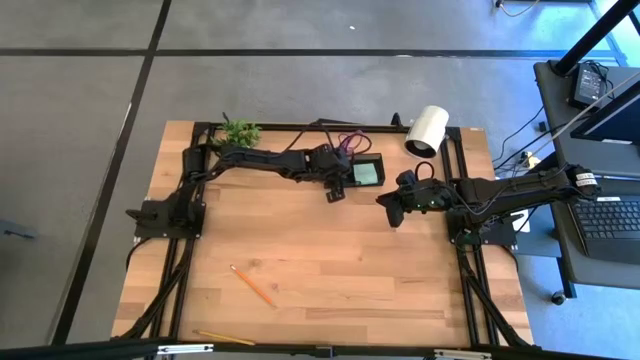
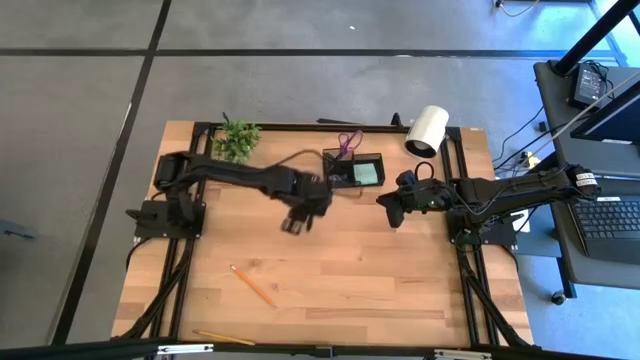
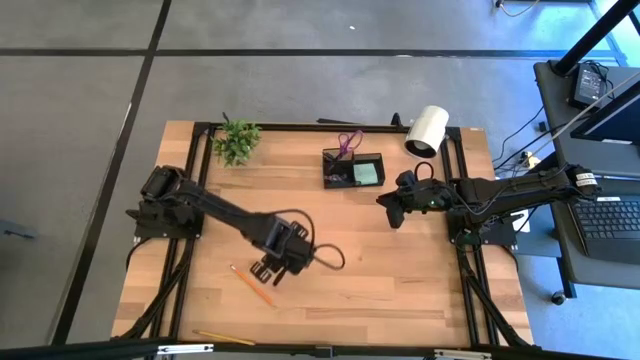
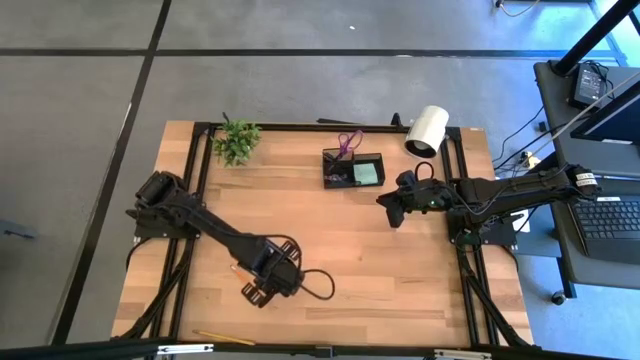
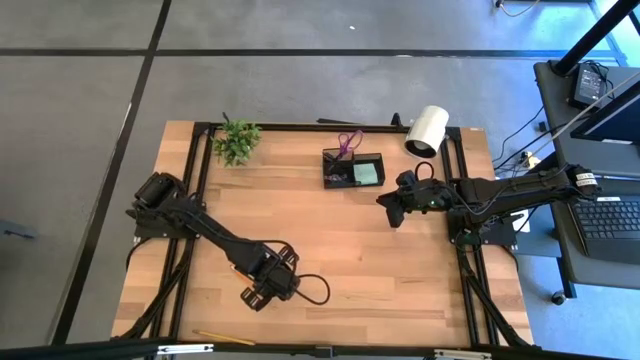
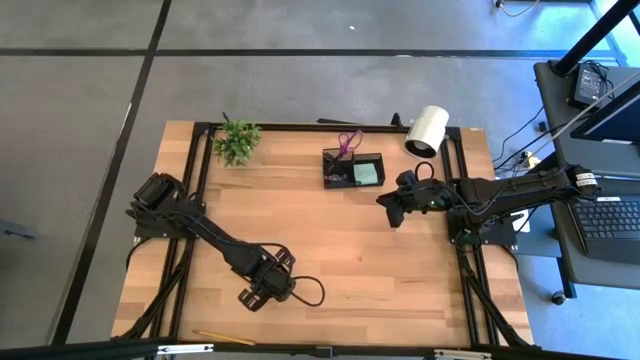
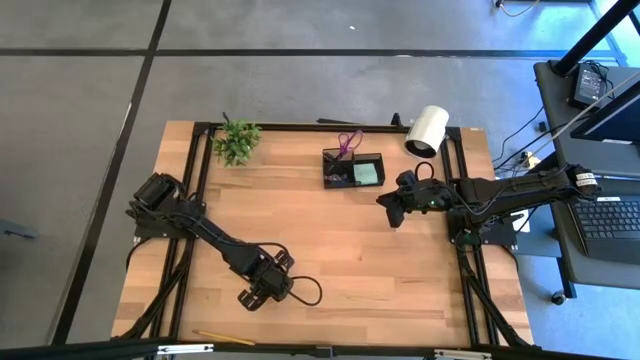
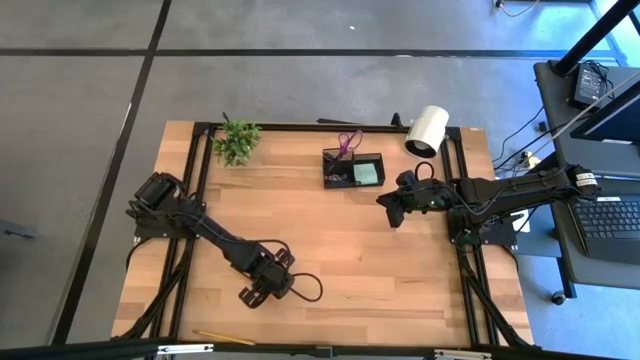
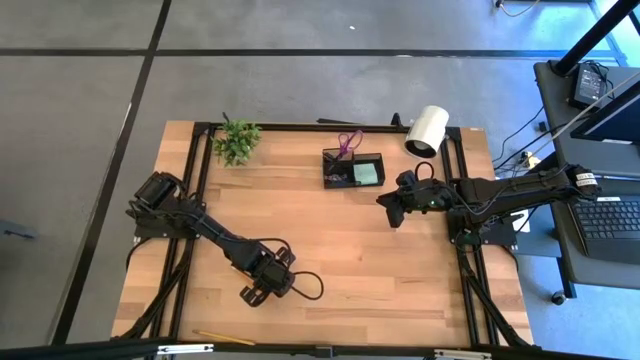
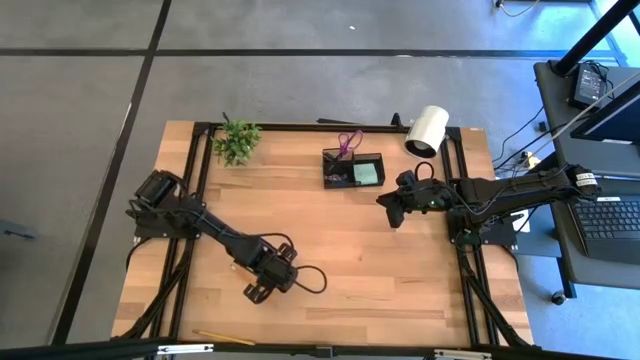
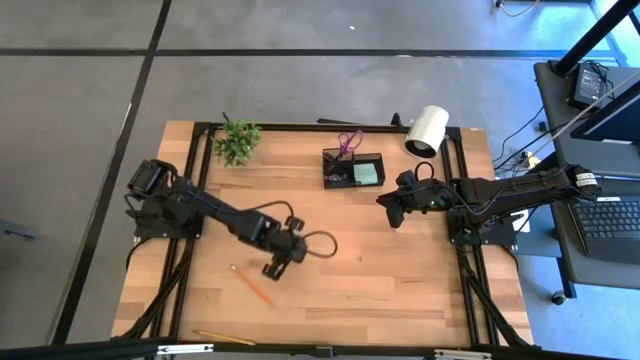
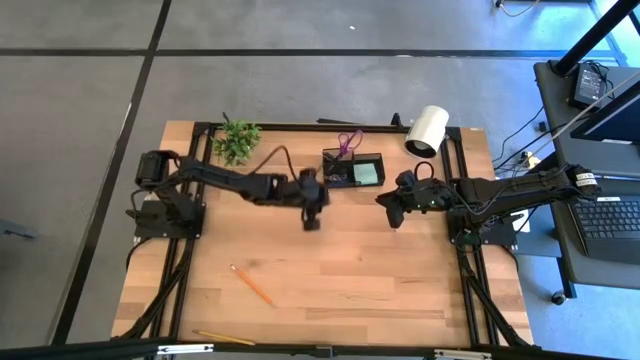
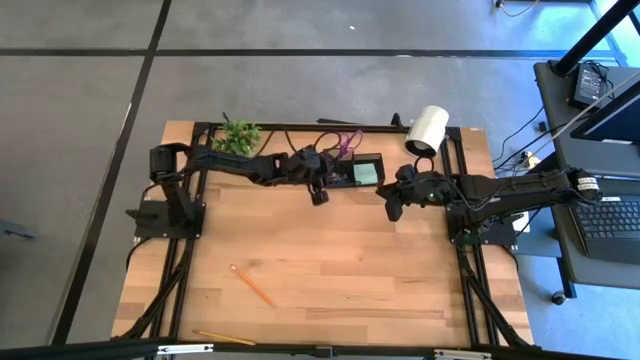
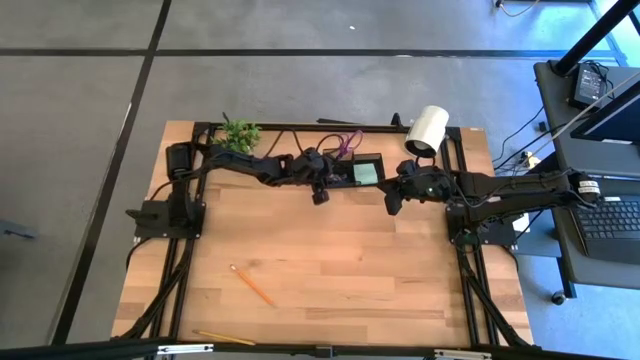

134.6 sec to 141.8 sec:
Task: Pick and place office supplies into organizer
Put the pink binder clip into the black desk organizer

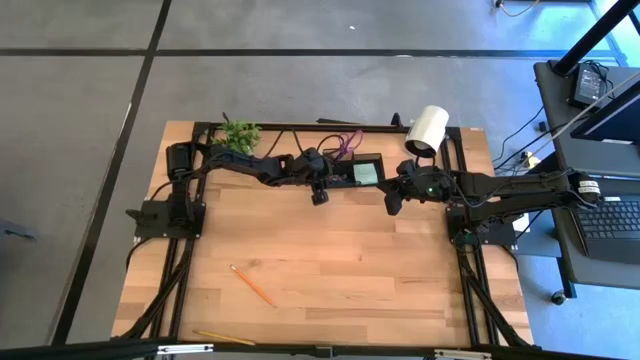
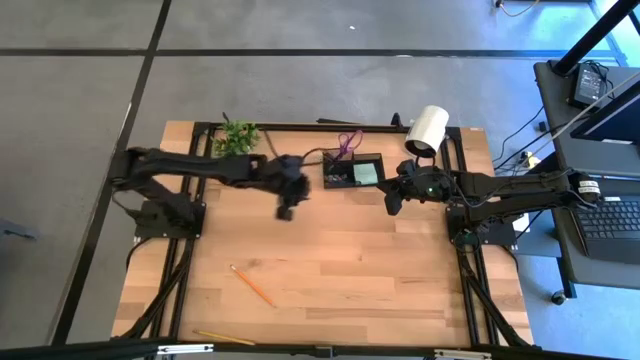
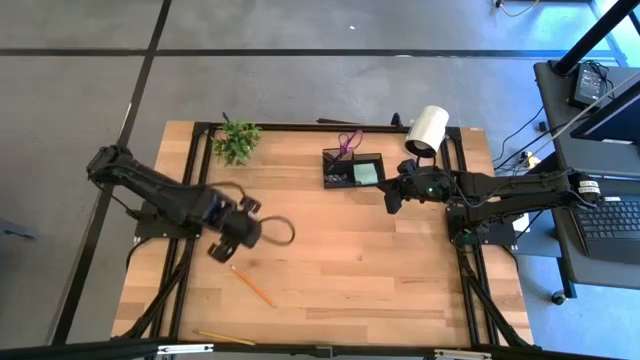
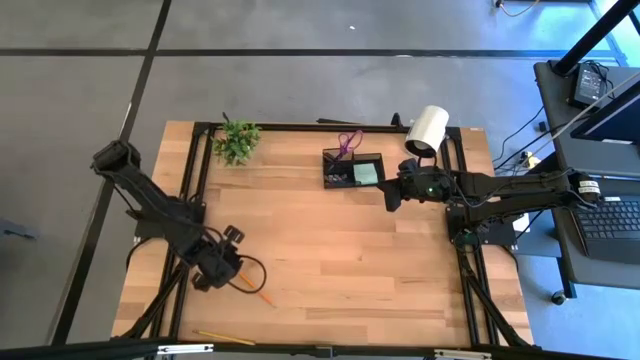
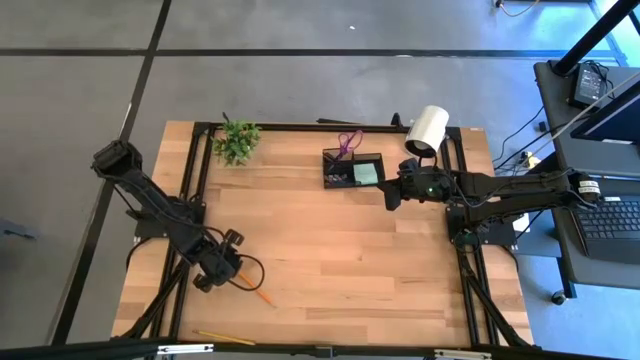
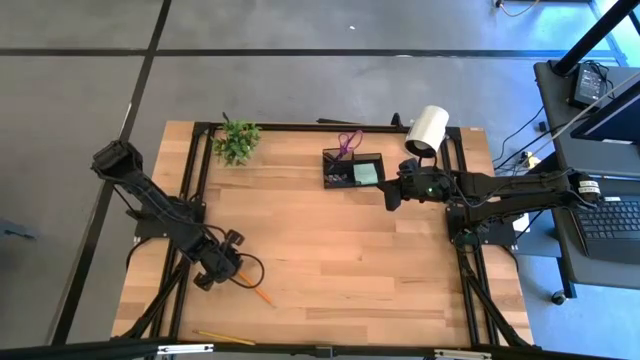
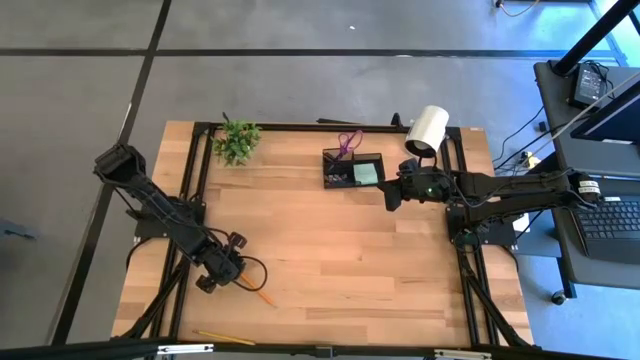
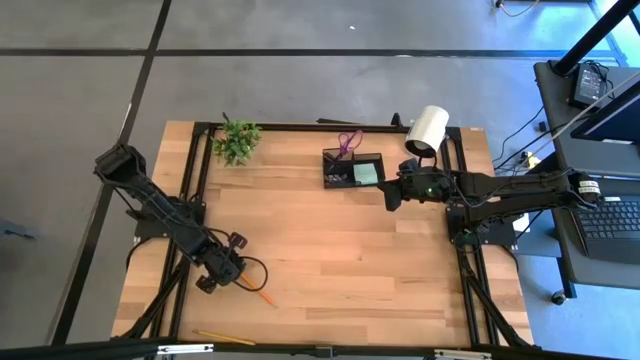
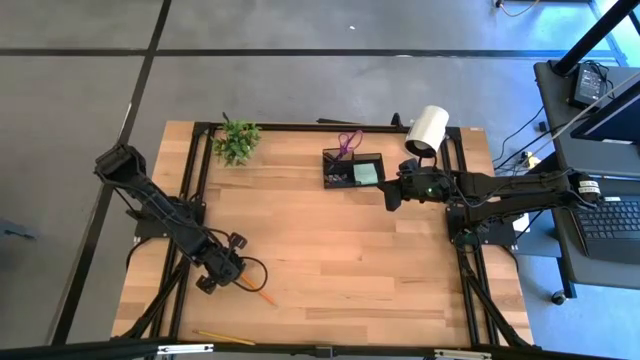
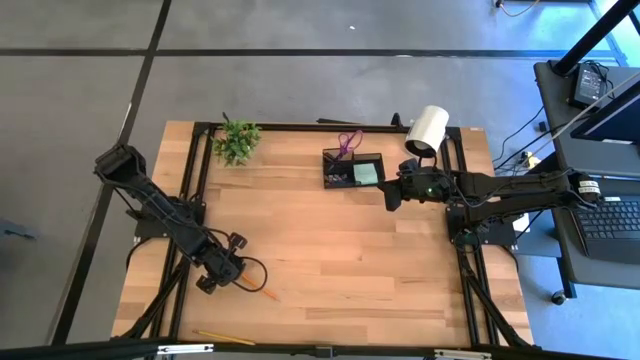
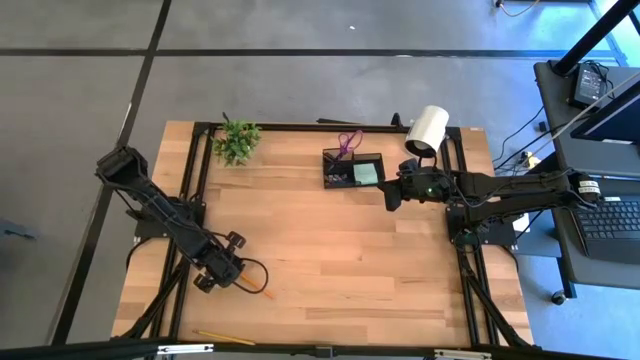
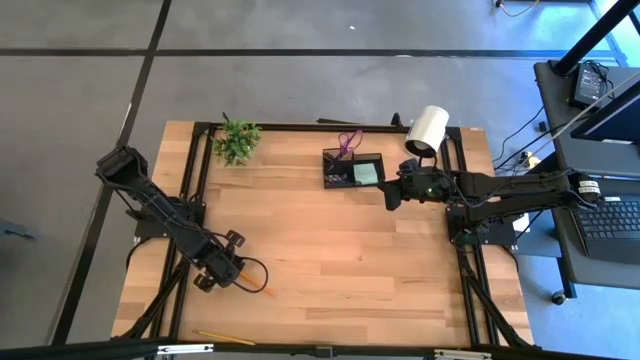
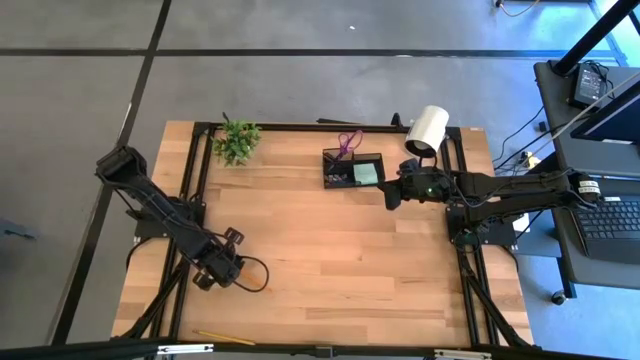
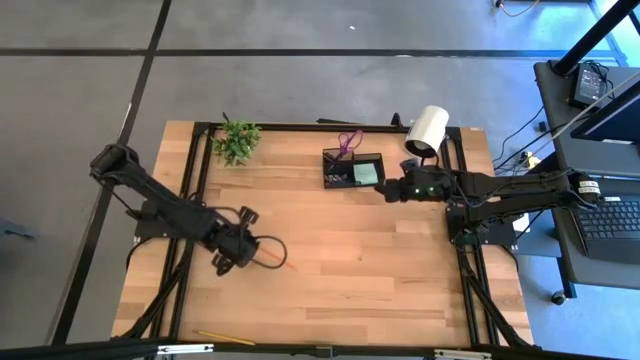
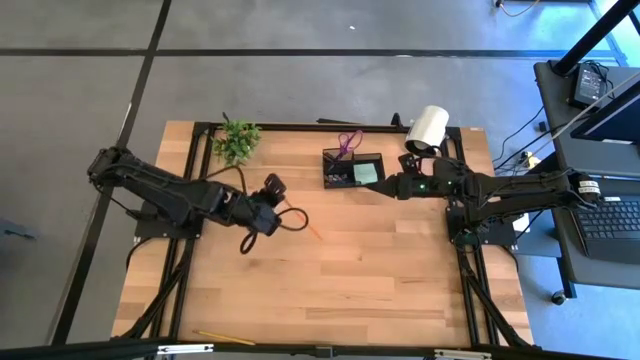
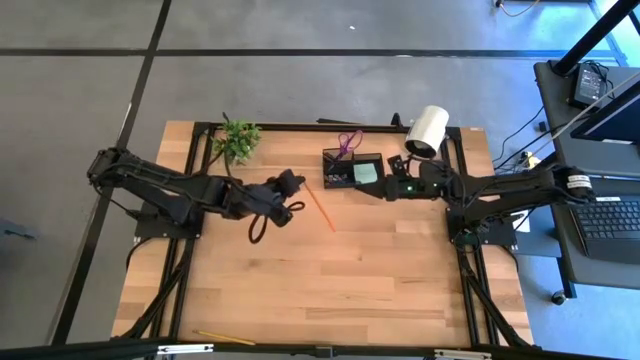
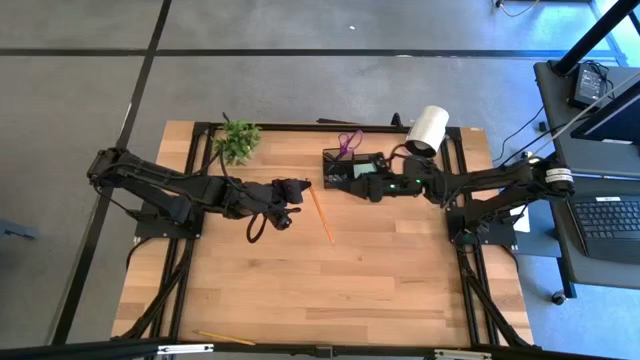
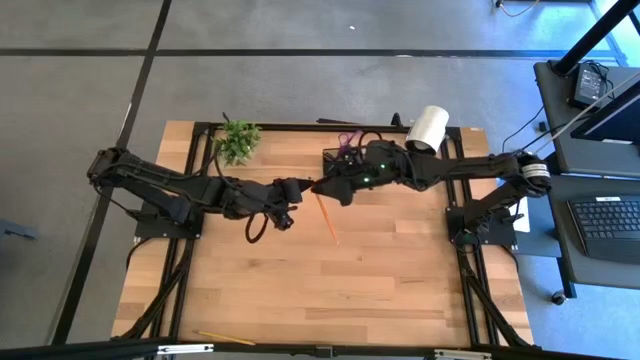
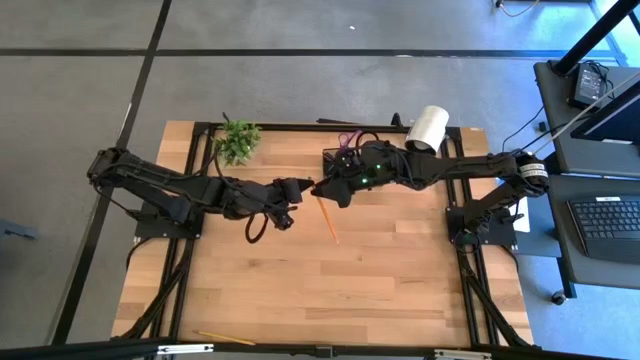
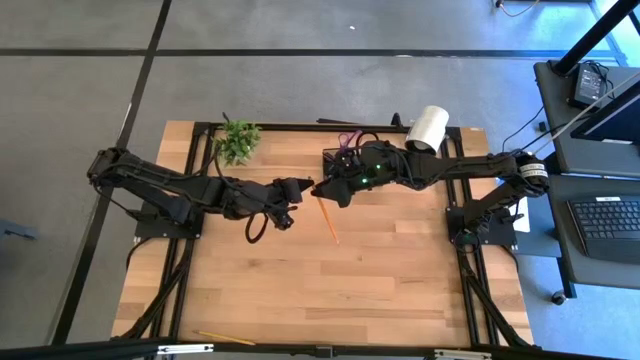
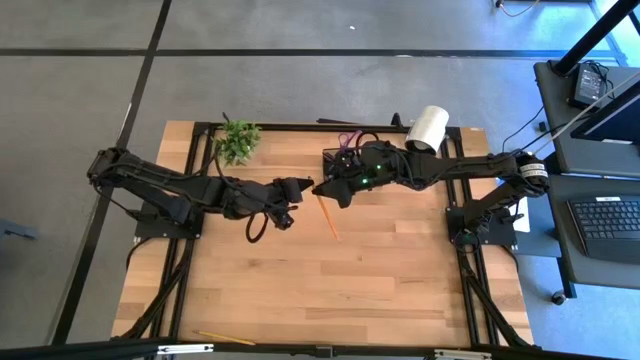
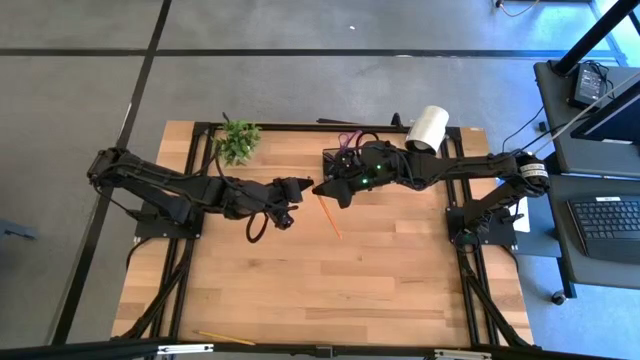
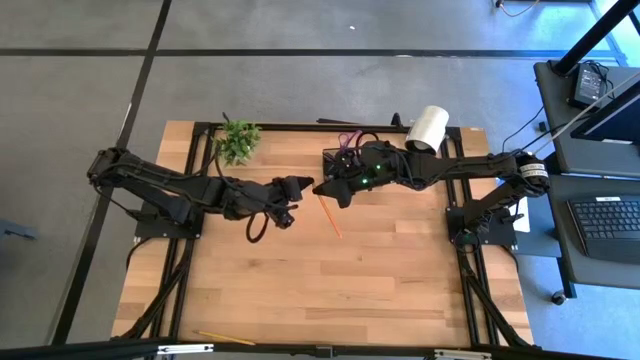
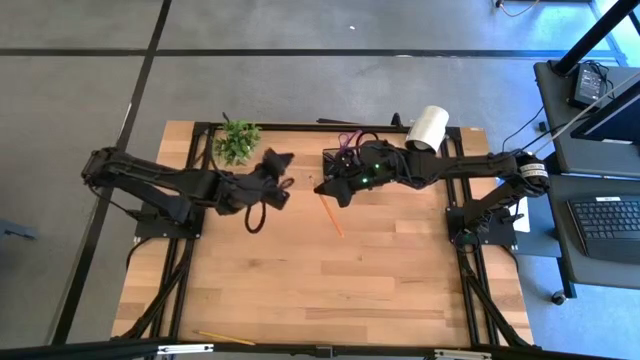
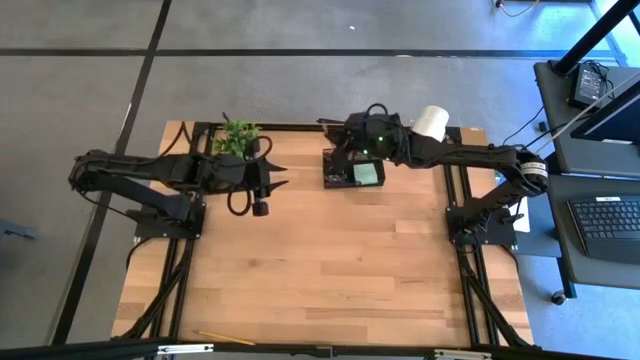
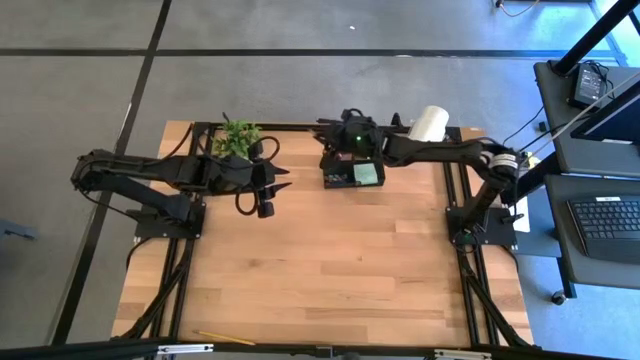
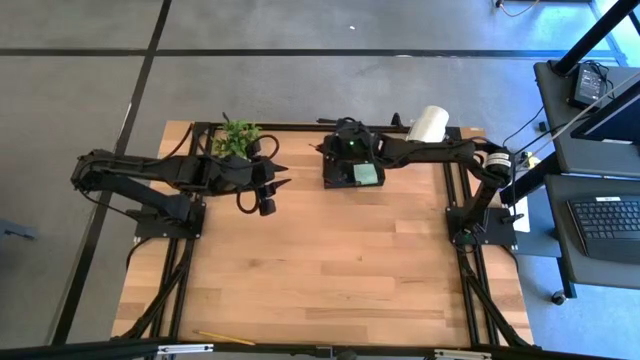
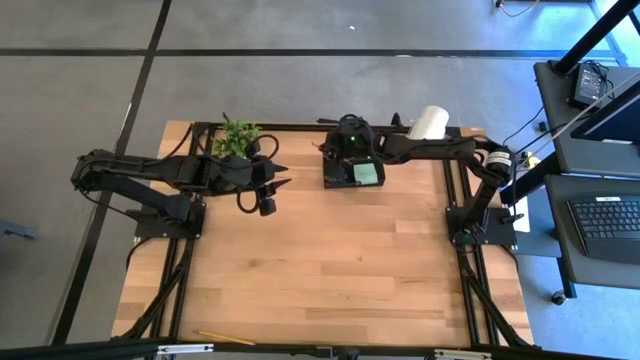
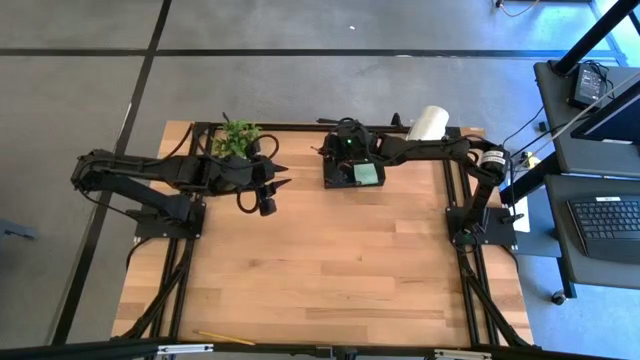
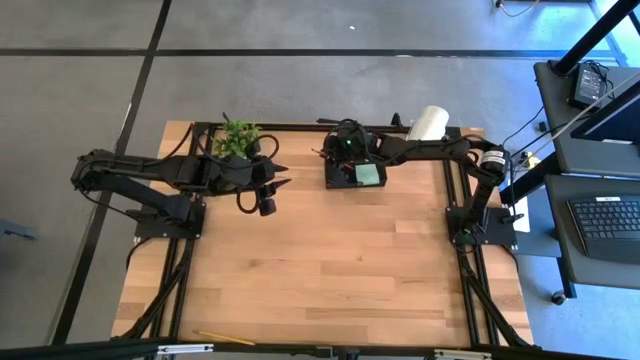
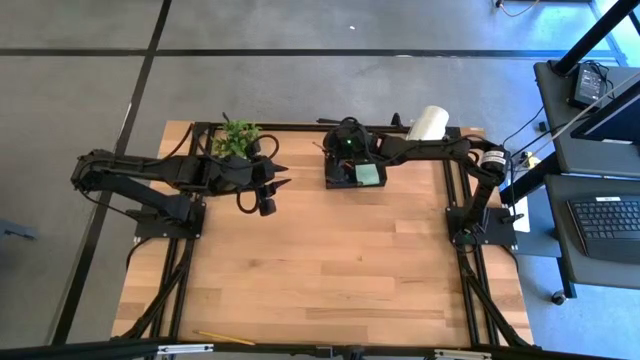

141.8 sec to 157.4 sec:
Put the orange pencil into the black desk organizer
